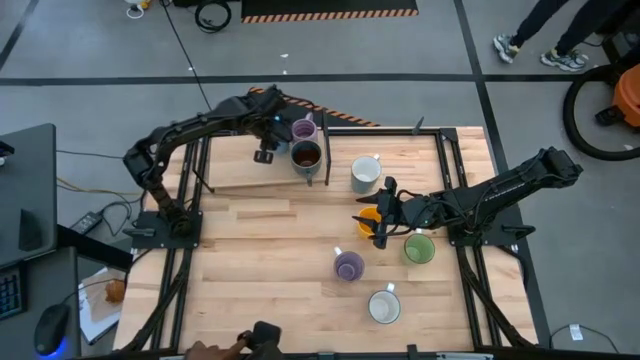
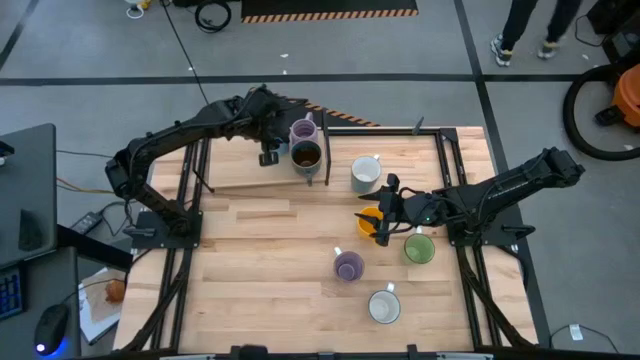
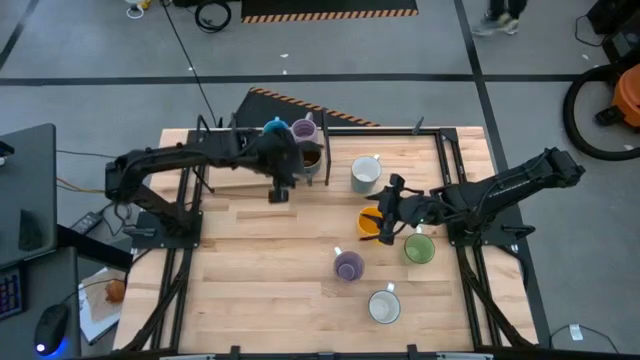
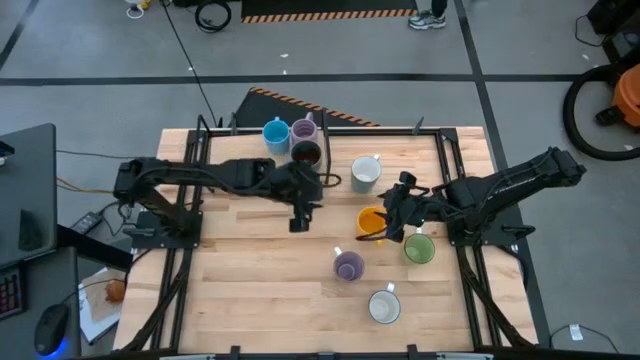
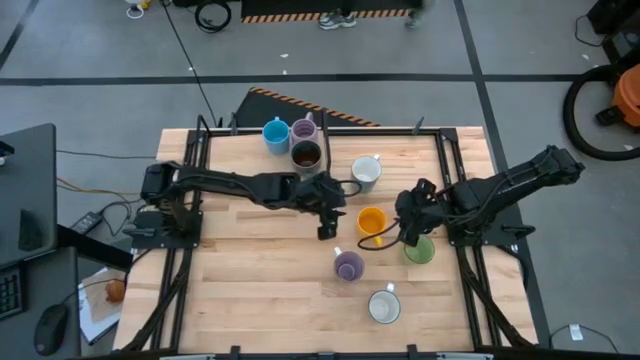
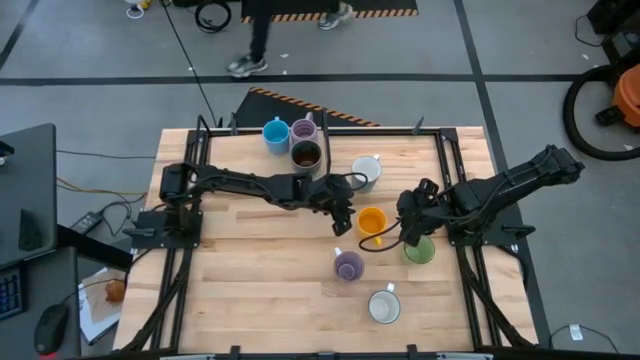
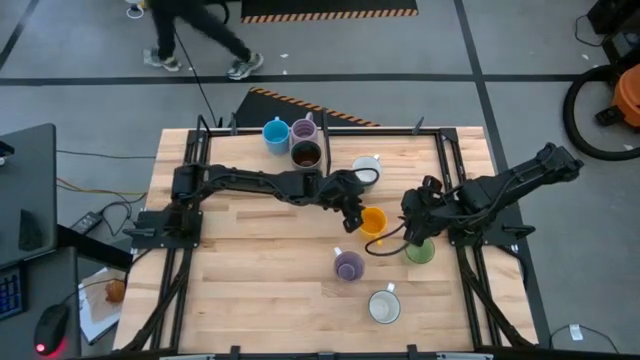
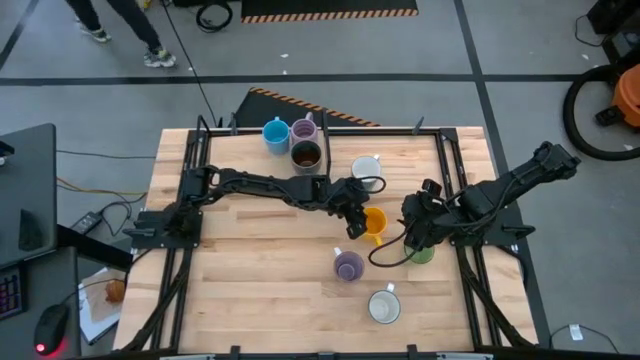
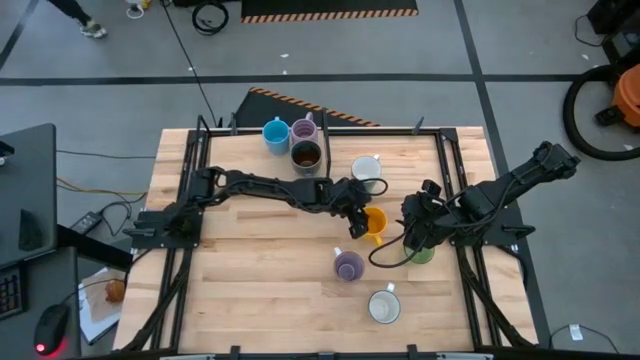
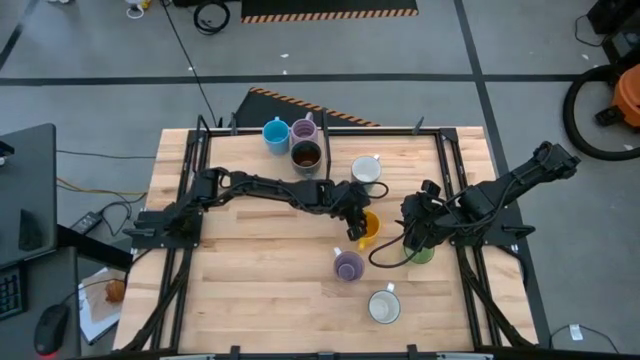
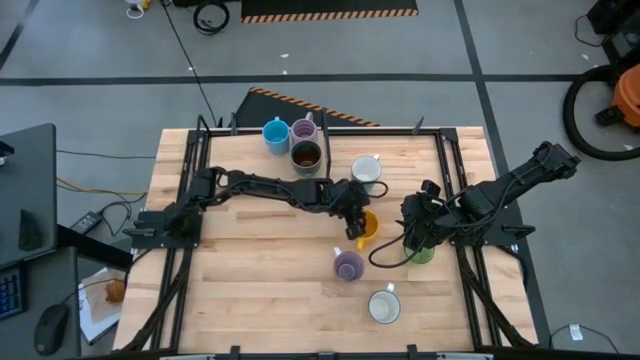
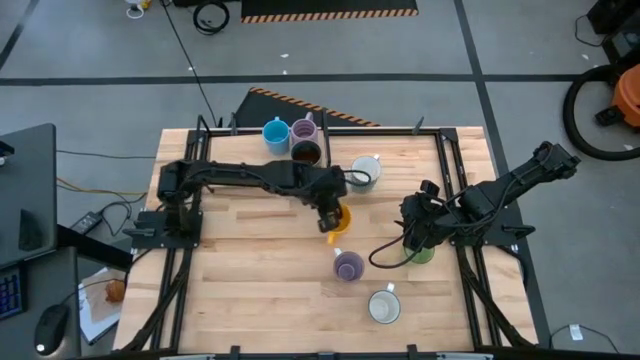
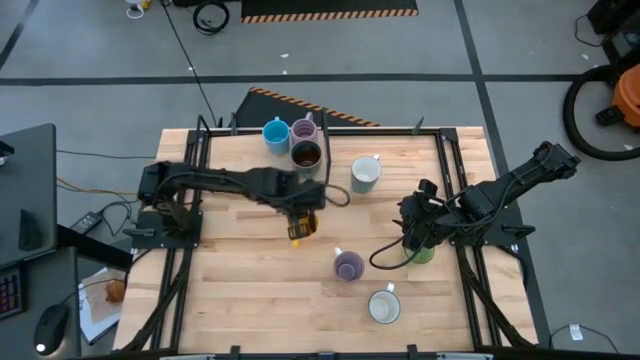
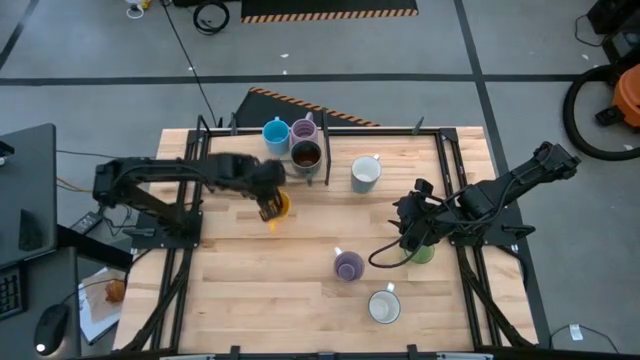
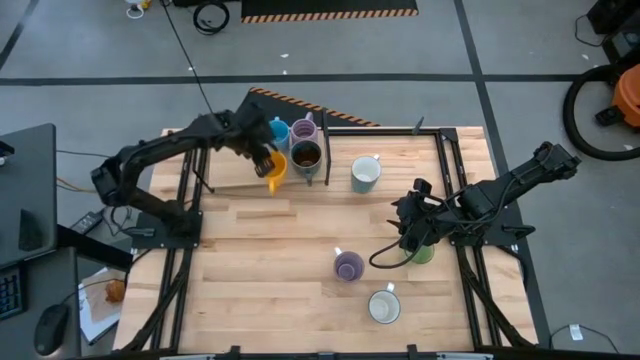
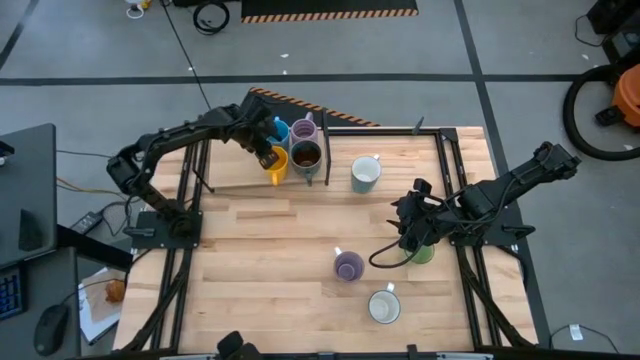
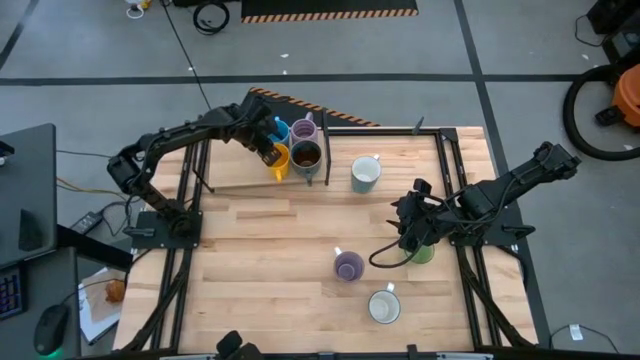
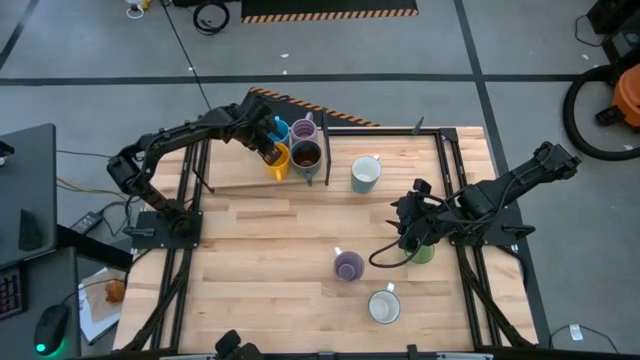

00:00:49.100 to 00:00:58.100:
Task: Place coffee mugs
Put the yellow mug on the shelf

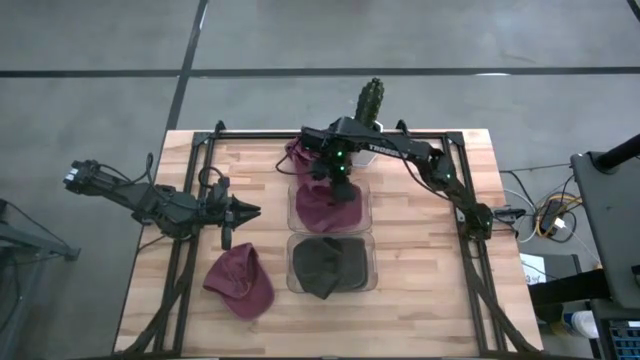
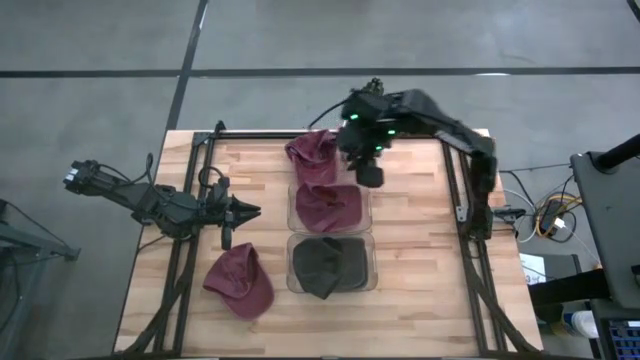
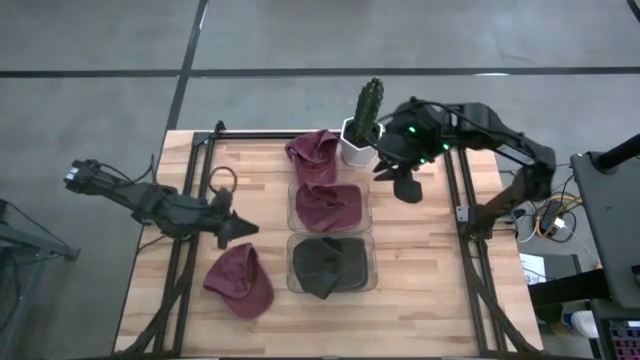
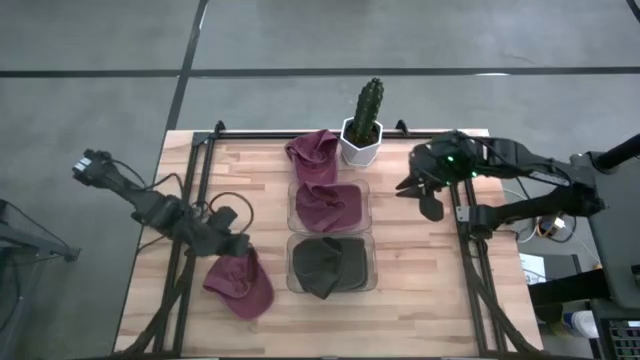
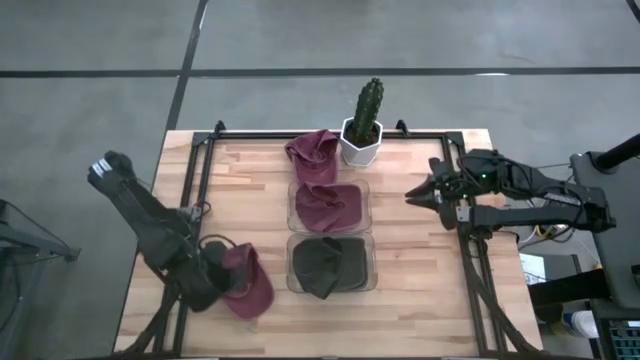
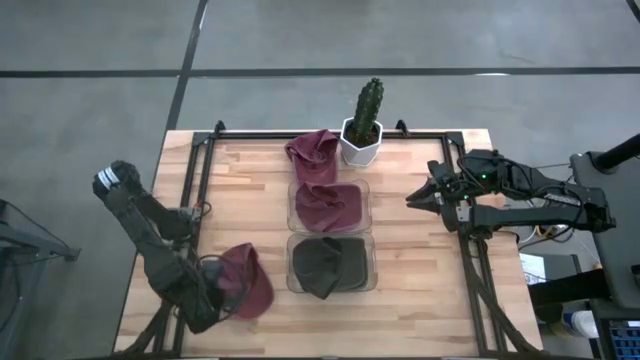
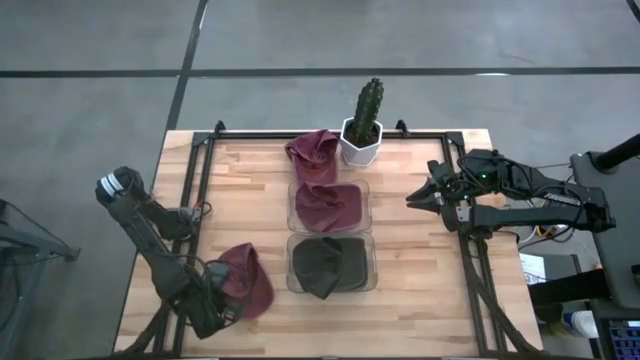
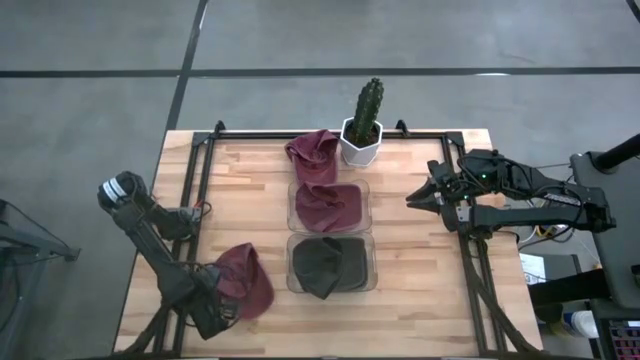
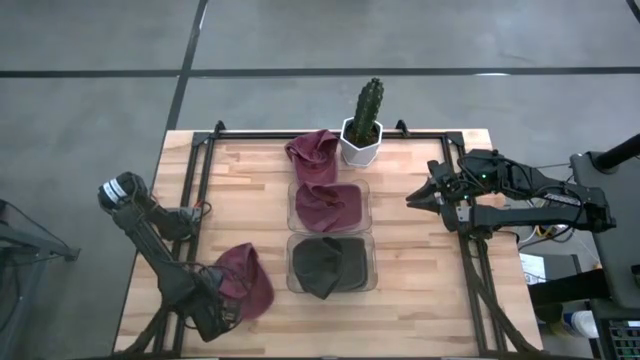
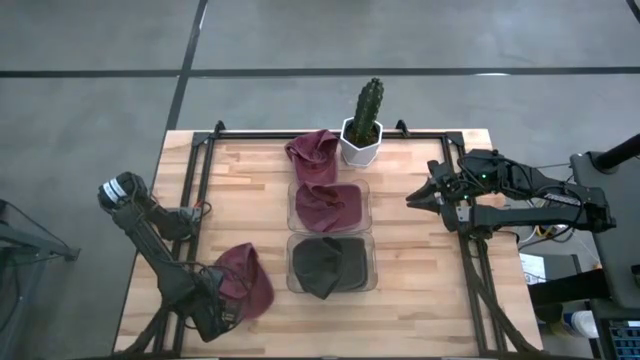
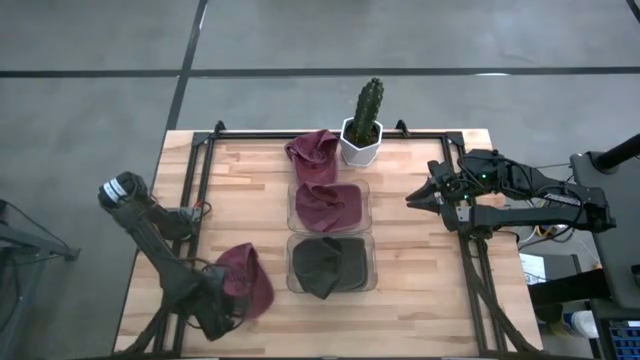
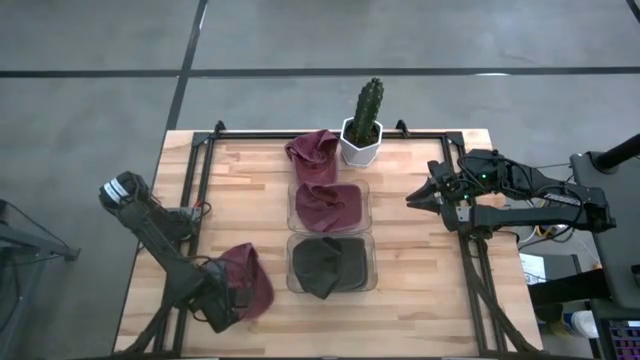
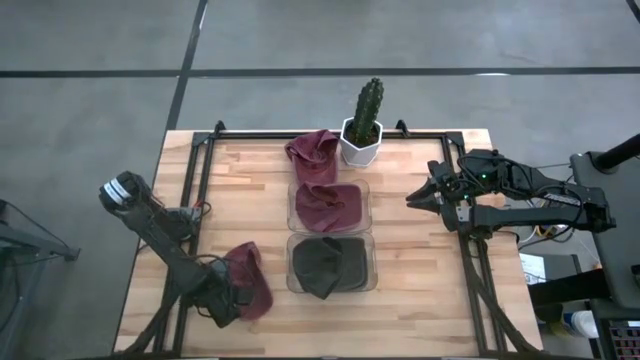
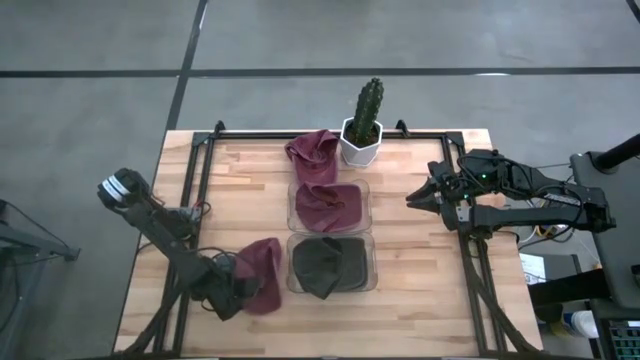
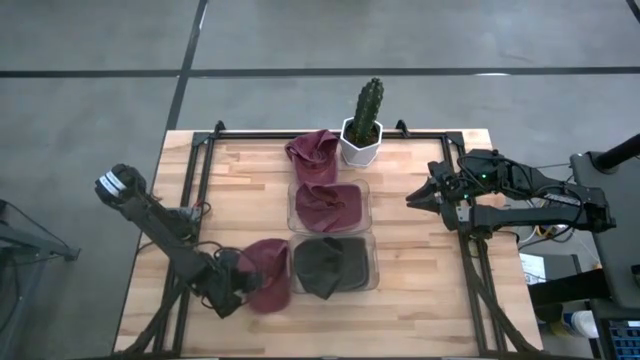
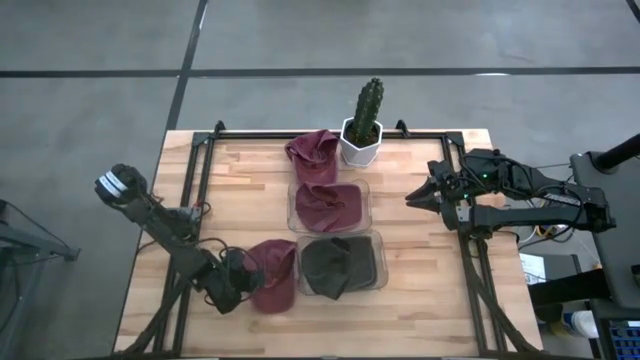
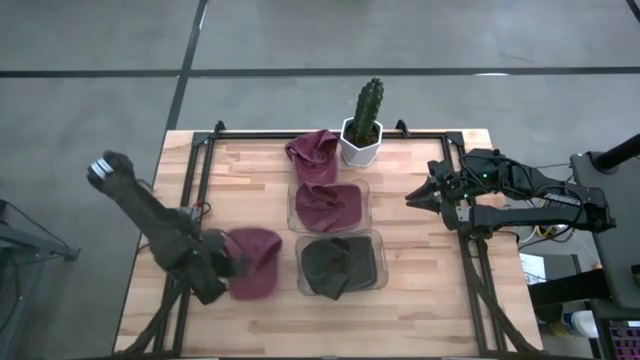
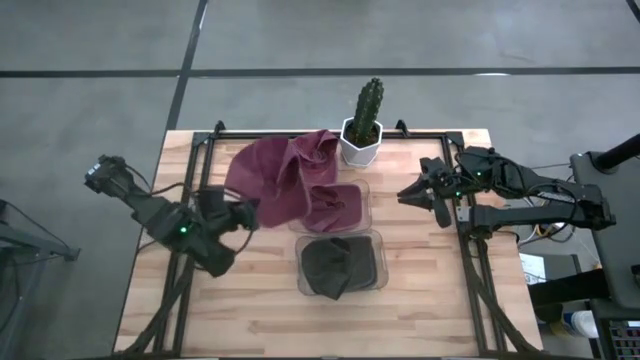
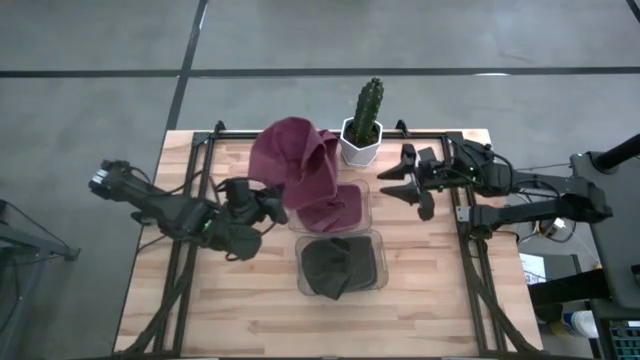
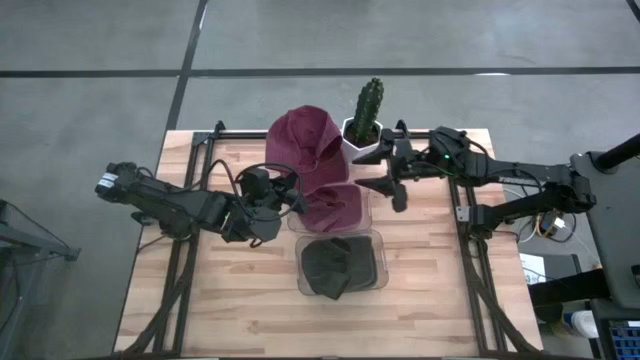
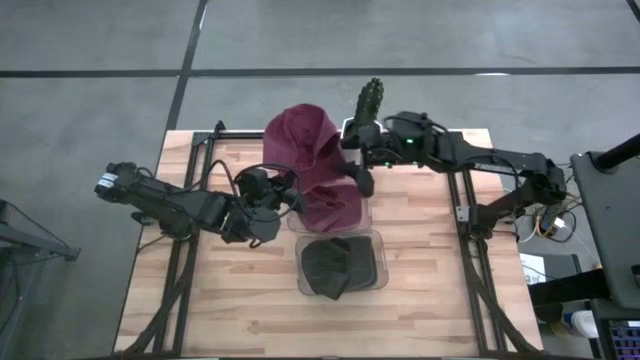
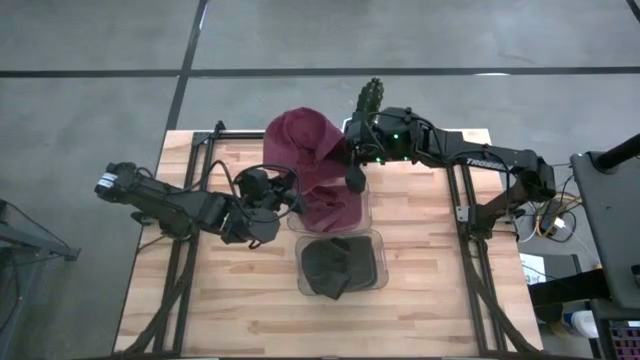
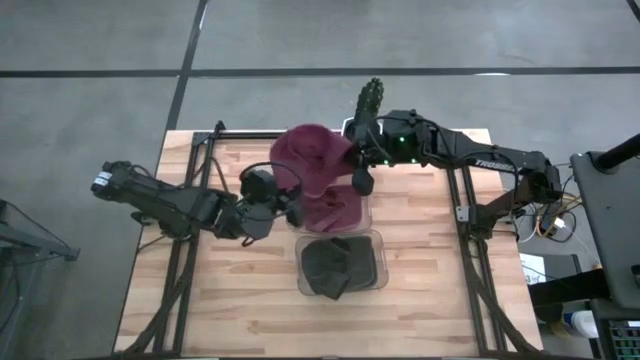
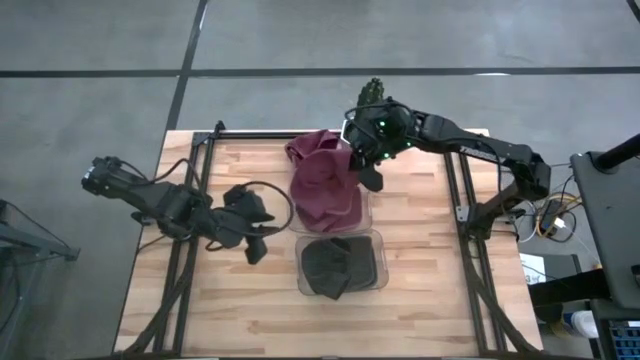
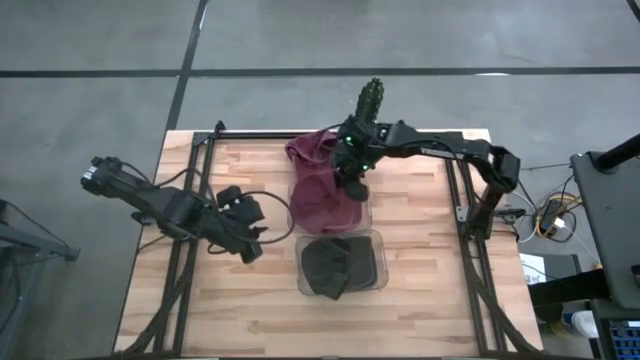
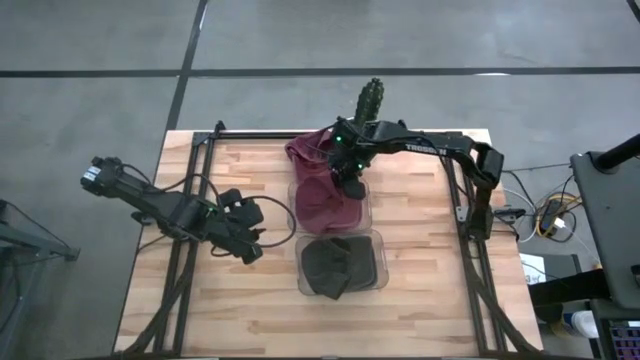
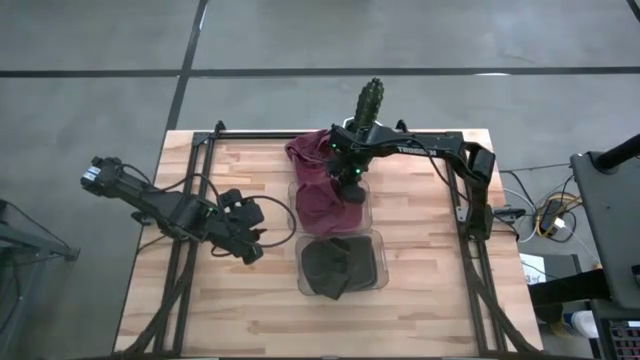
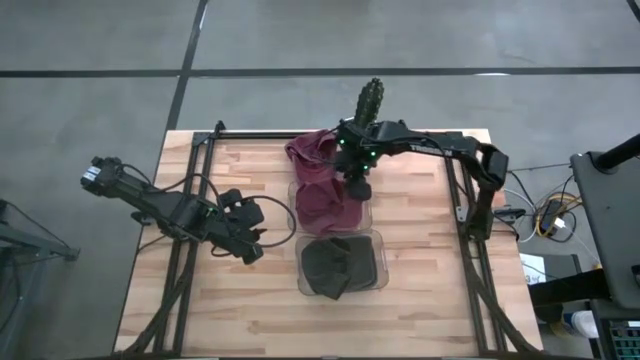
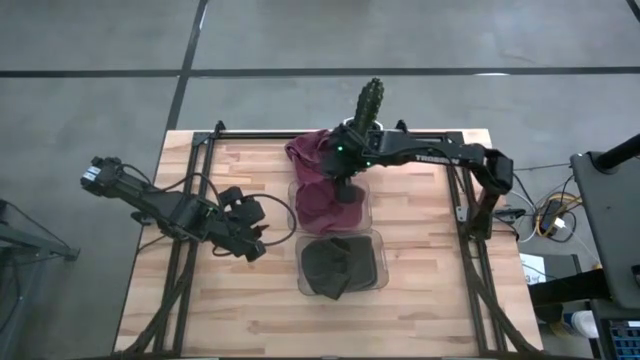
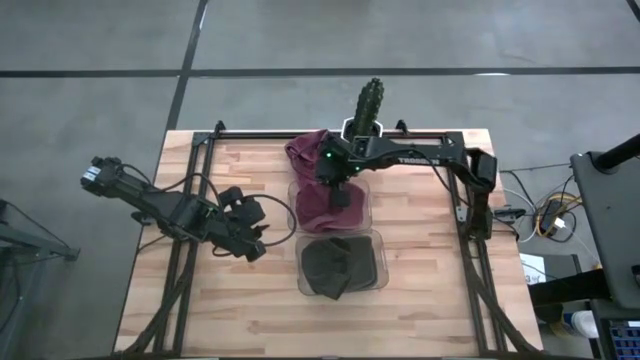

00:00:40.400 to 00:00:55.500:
Task: Pick & Place hat
Put the bottom dark red cap into the top transparent bin
